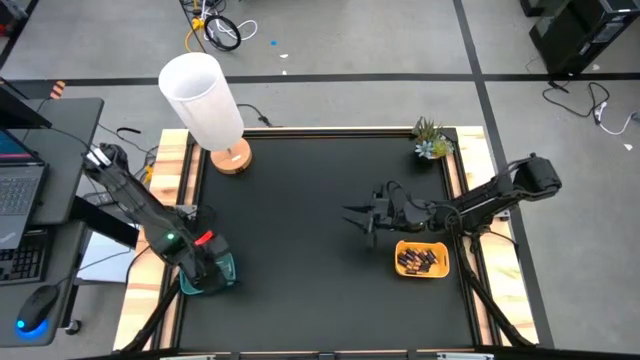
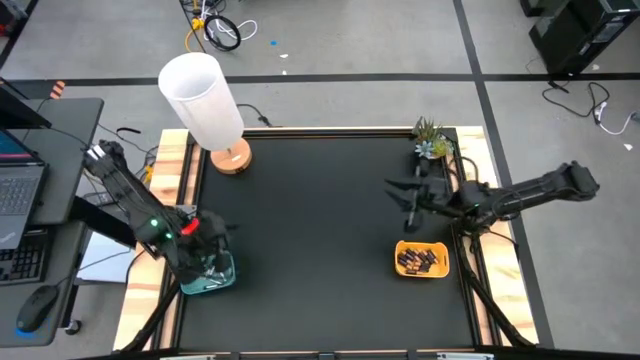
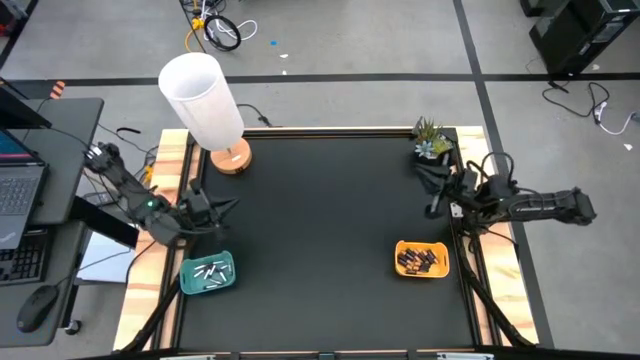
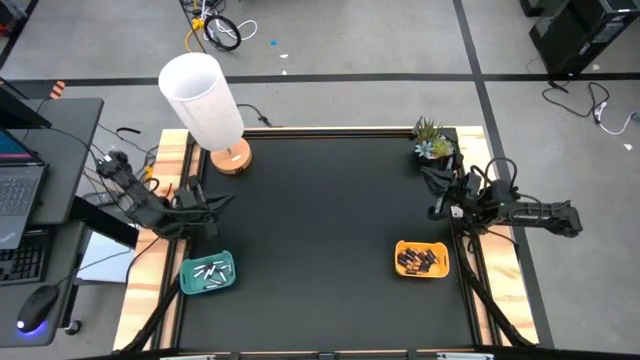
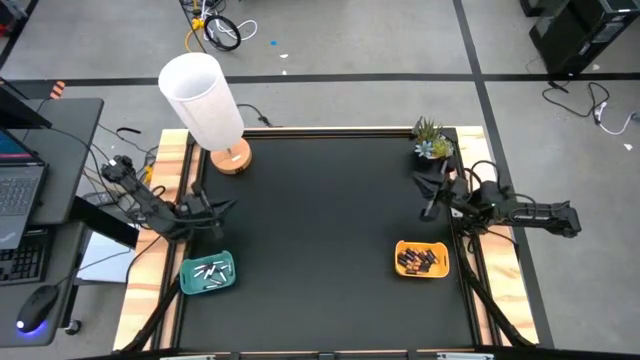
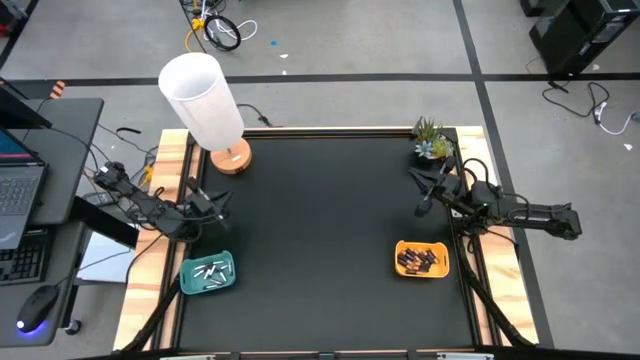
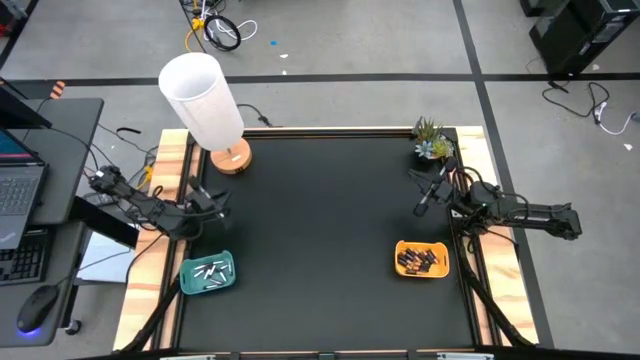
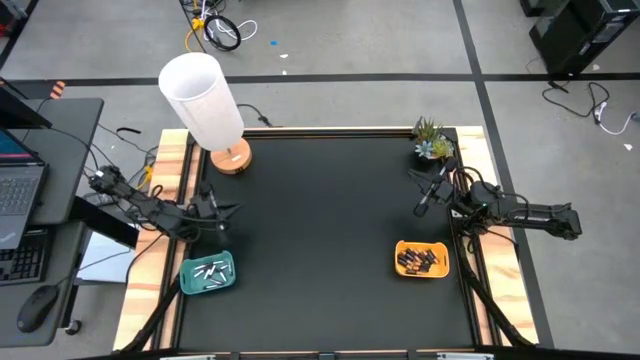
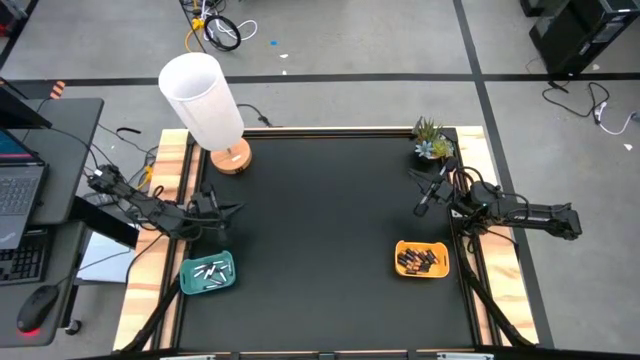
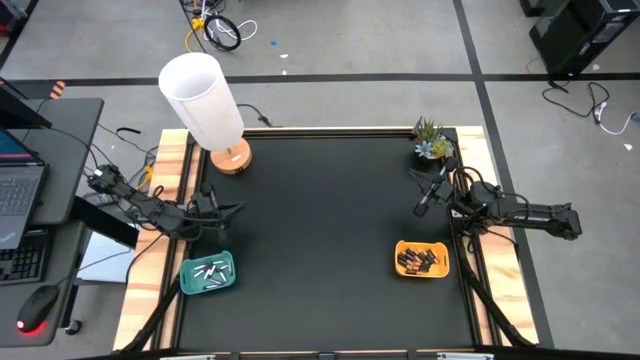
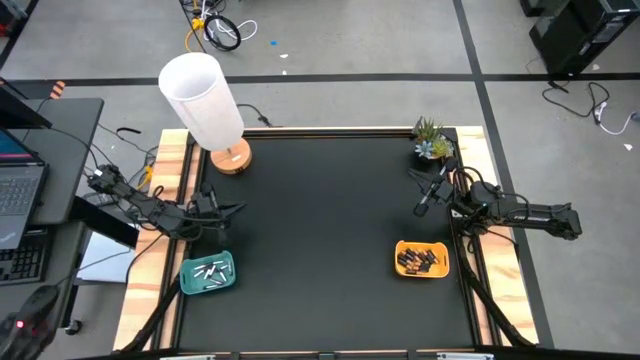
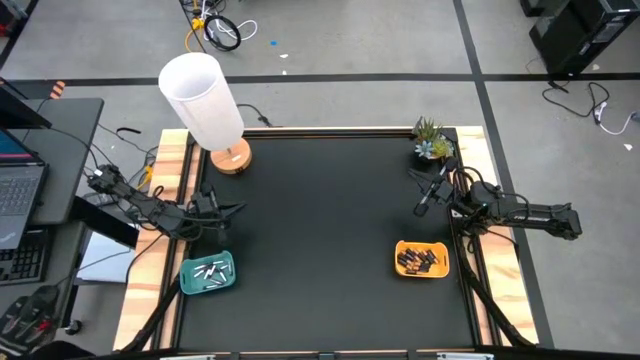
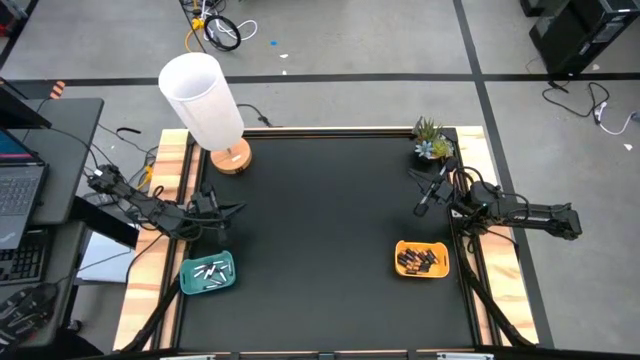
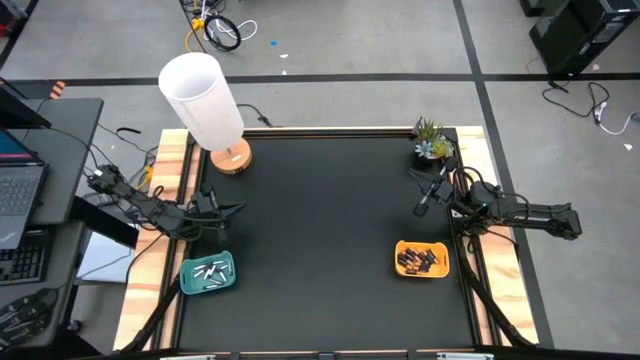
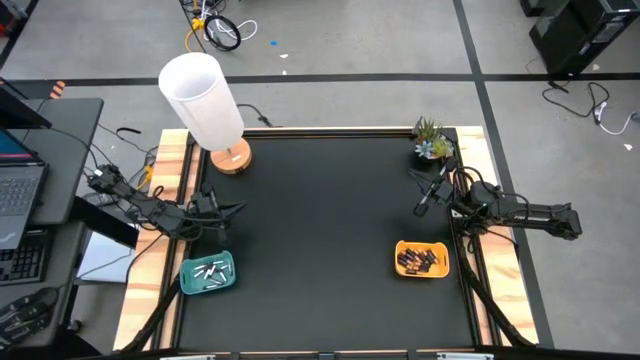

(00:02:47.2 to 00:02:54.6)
Task: Sort batteries
Return to Home Position

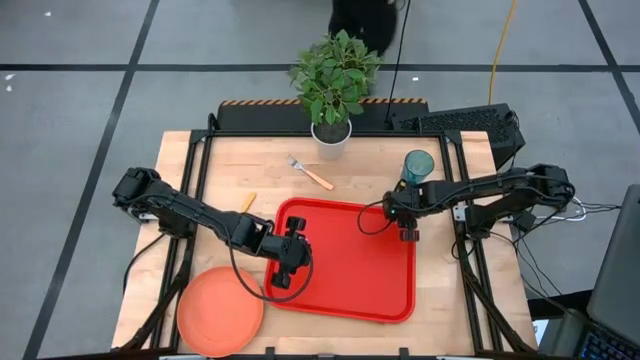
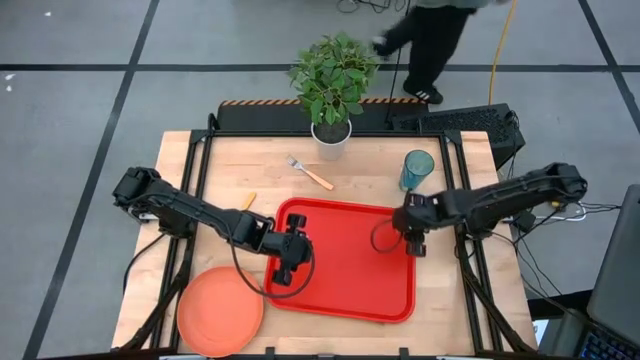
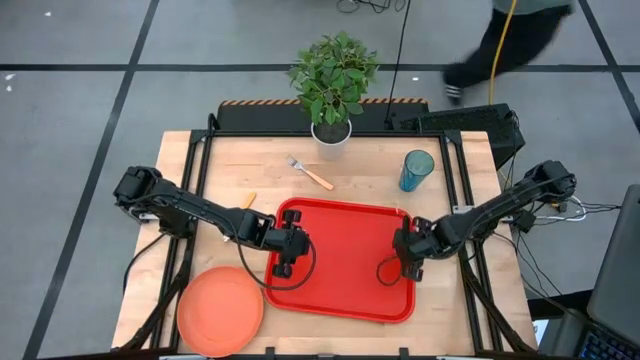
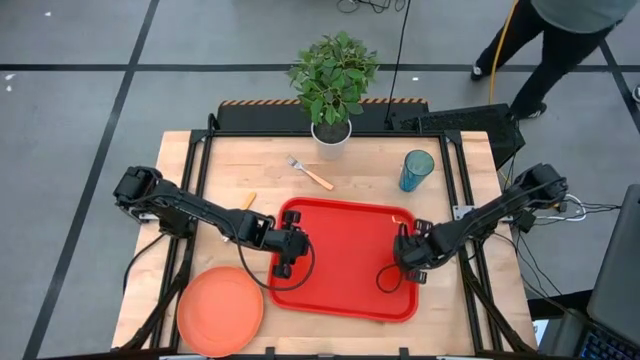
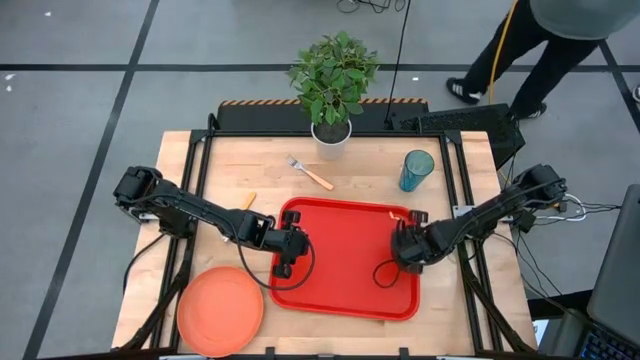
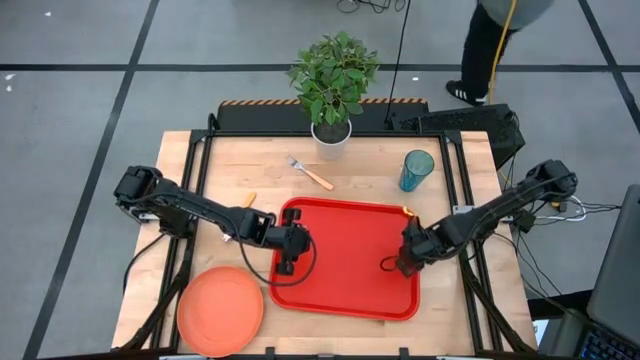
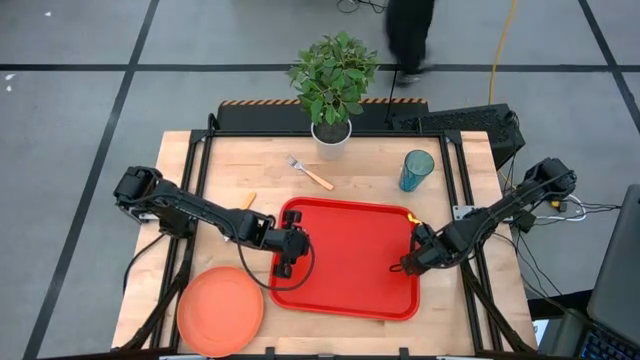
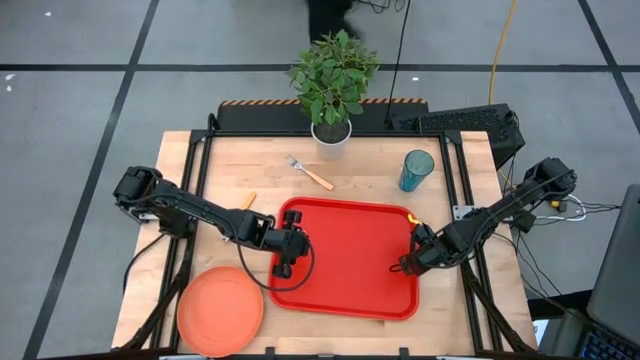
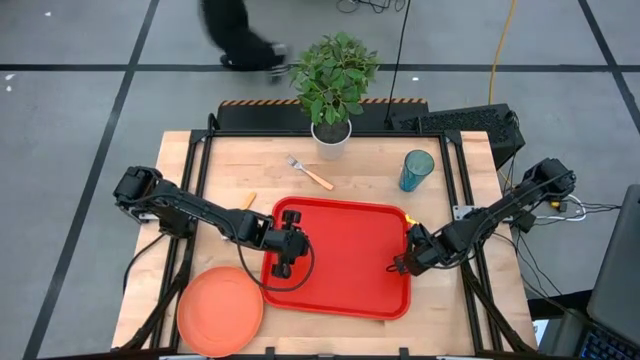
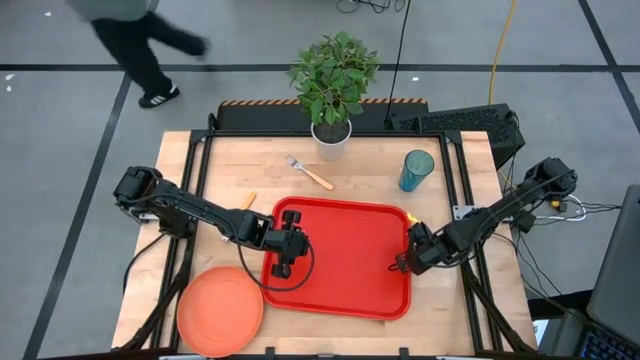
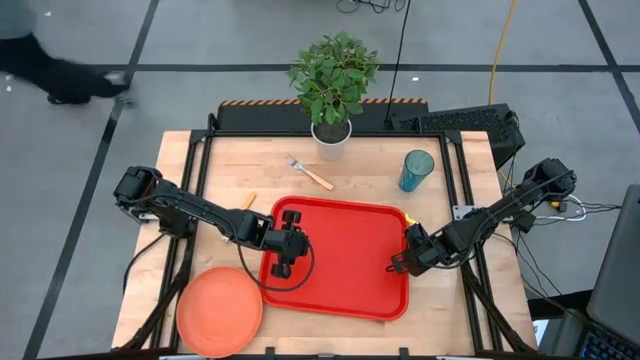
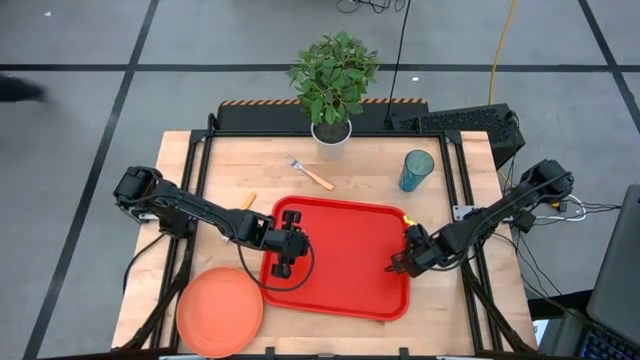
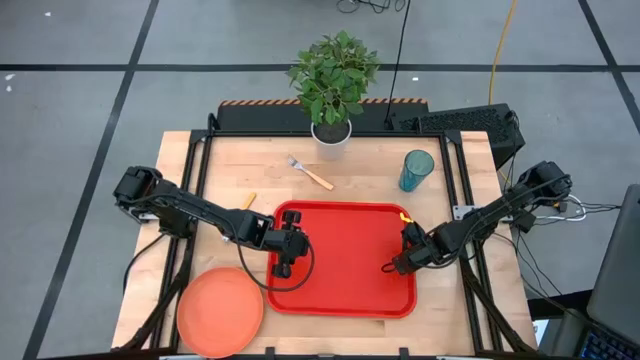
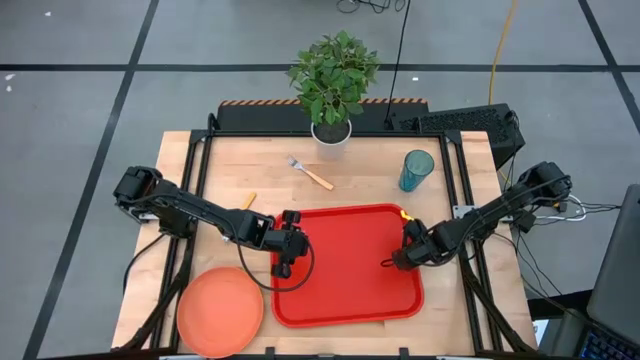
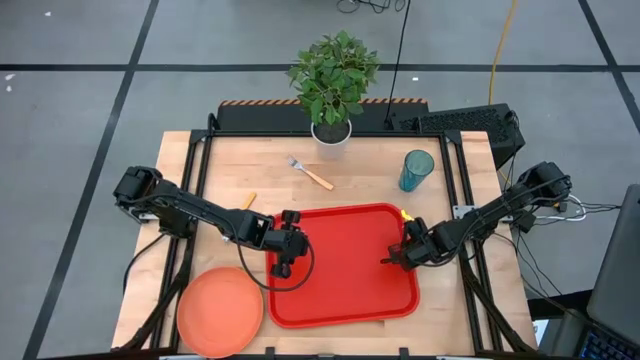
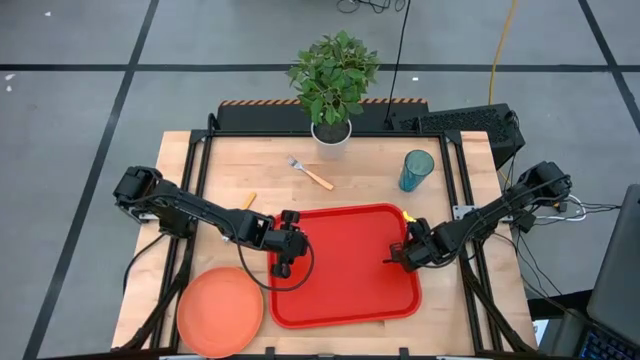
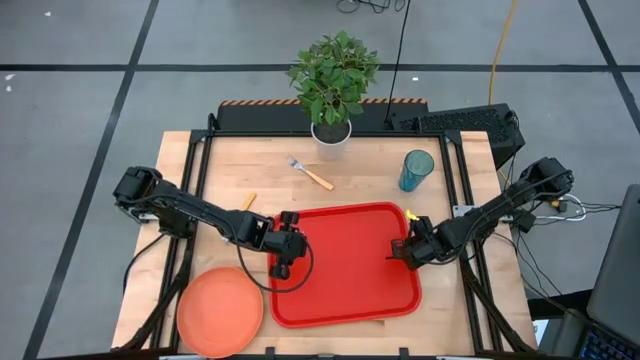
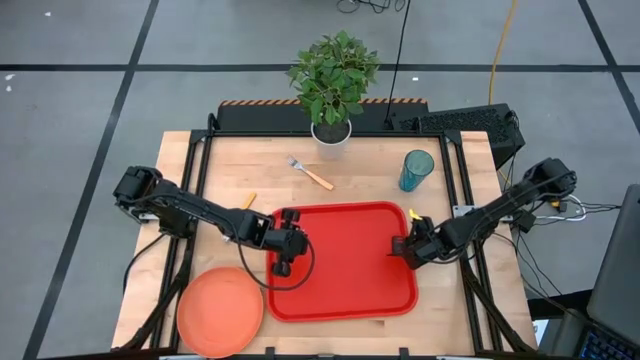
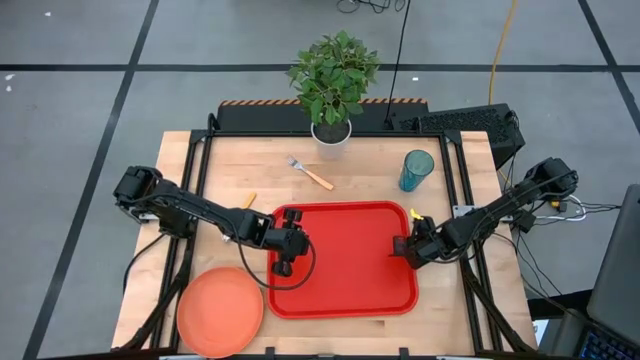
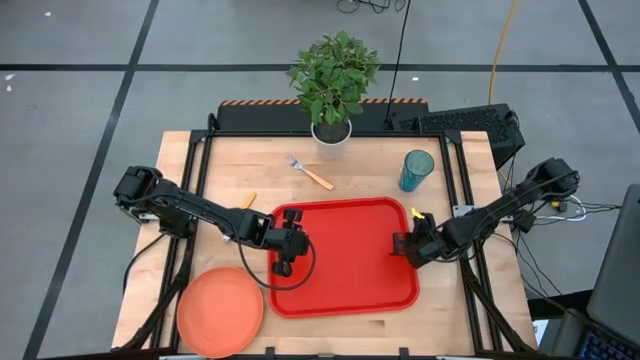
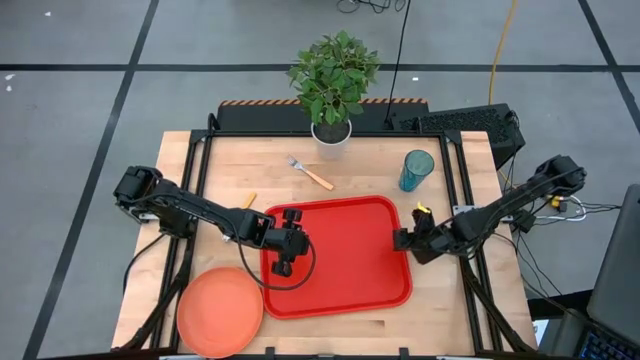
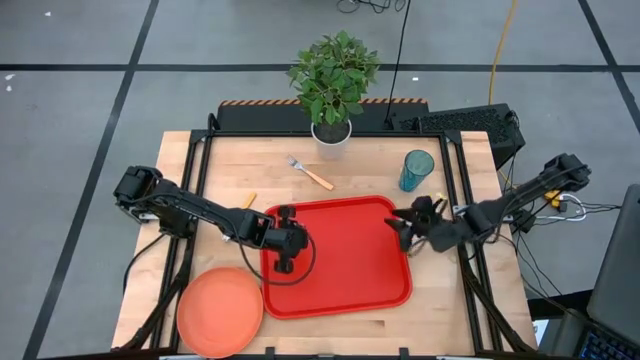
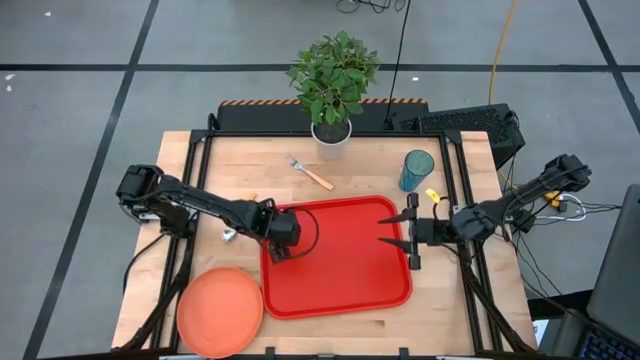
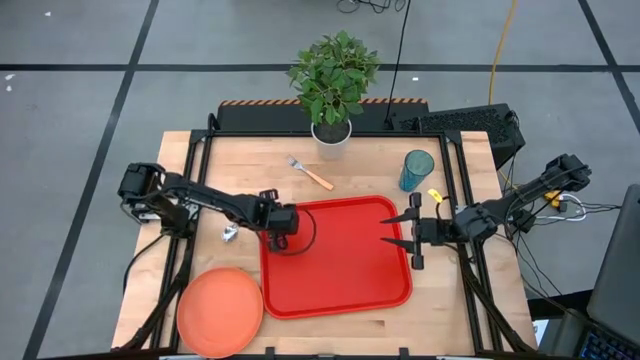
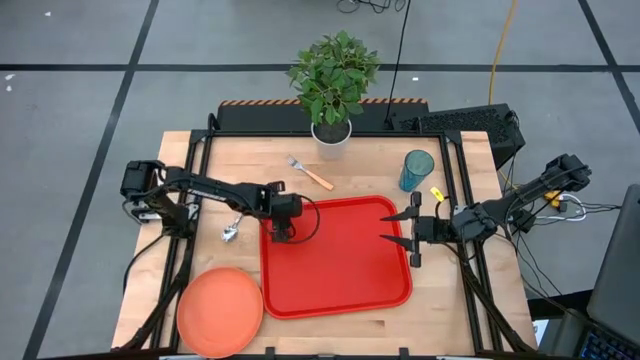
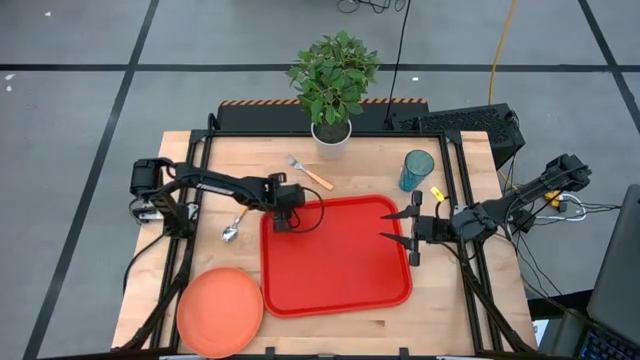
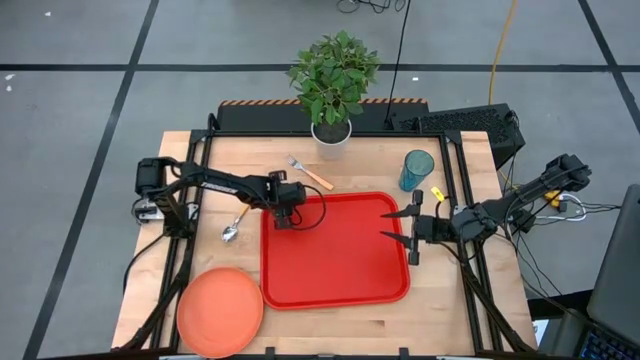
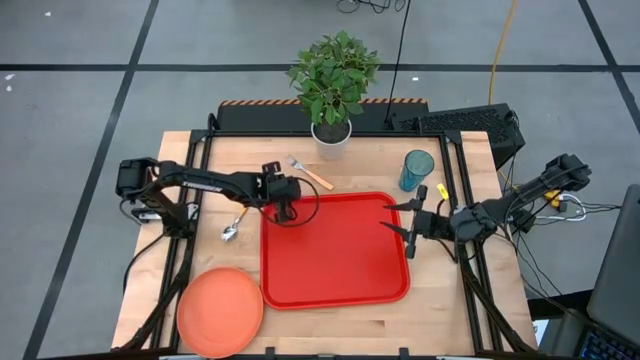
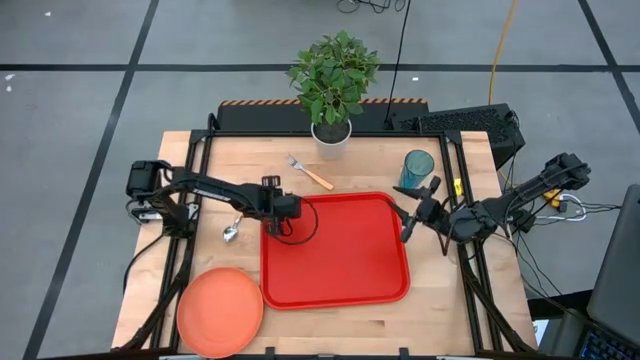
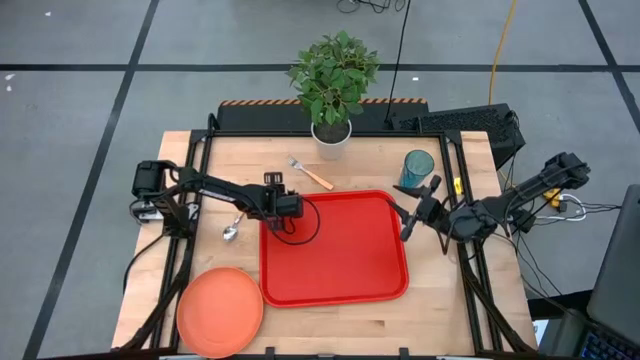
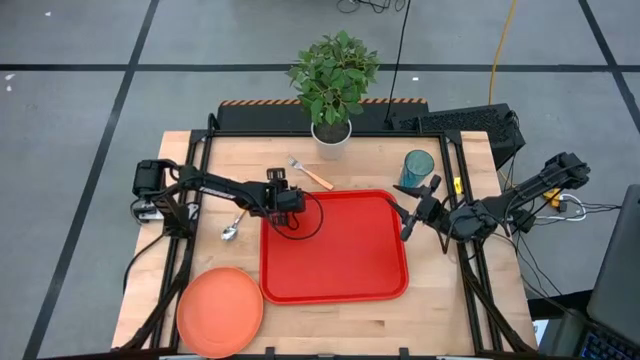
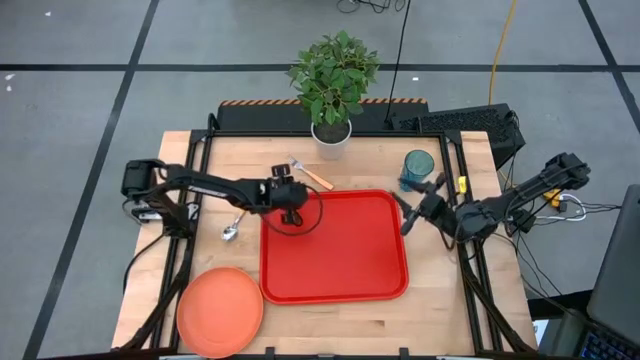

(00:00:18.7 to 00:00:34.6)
Task: Pick and place plate/cup/fork/spoon on tray
Move the red tray to the center of the table
